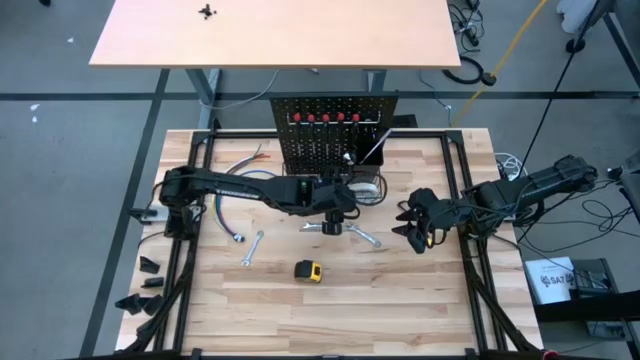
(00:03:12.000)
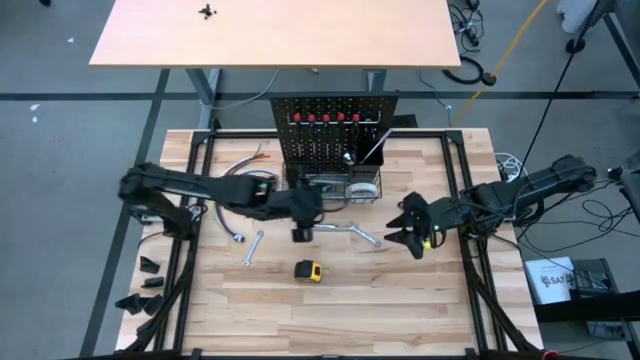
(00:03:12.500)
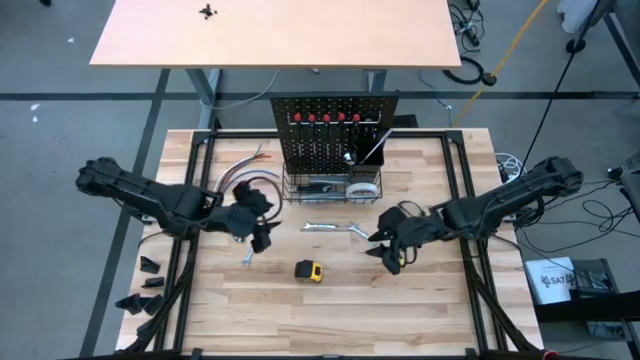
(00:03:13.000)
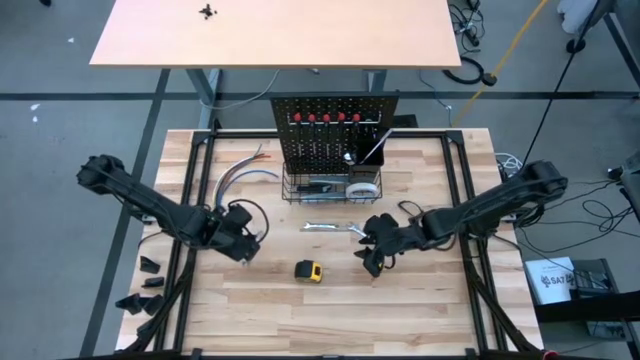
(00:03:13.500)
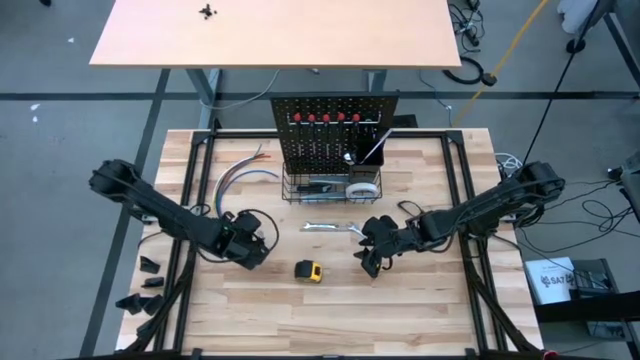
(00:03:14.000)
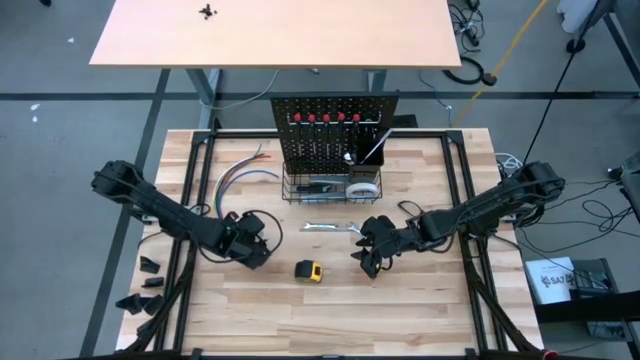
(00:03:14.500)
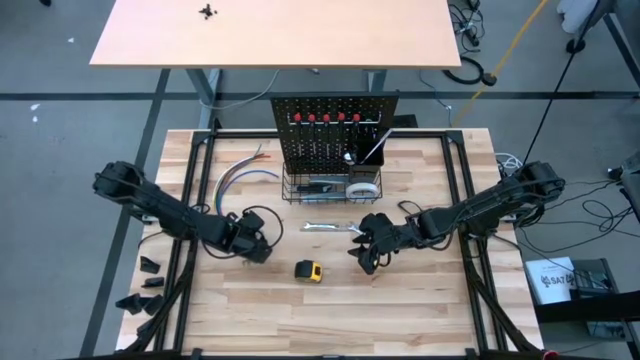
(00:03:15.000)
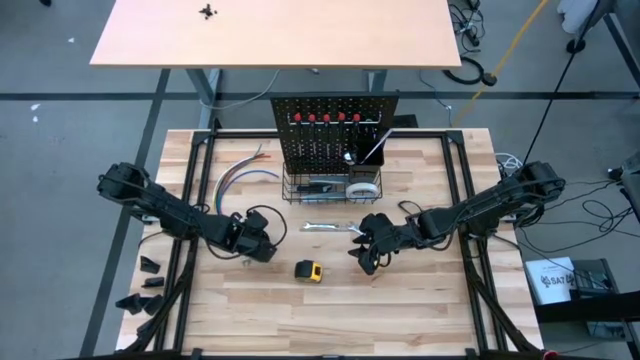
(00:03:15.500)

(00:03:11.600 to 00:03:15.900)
Task: Hang tools onto peg board
Put the wrench into the pegboard bin

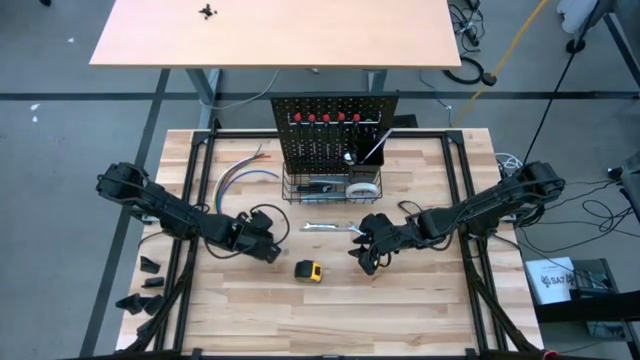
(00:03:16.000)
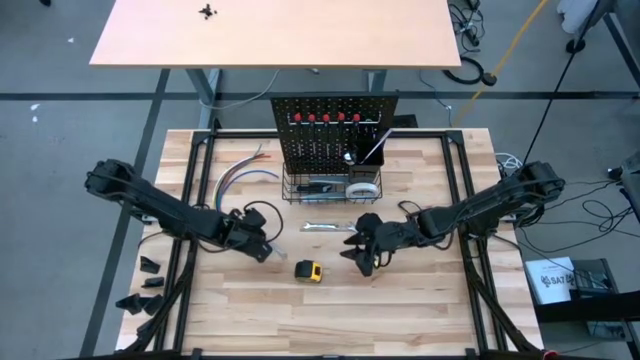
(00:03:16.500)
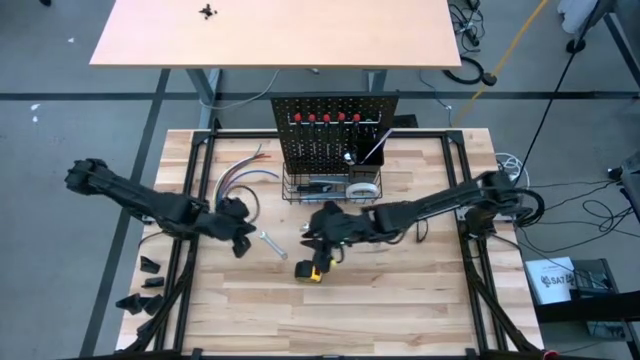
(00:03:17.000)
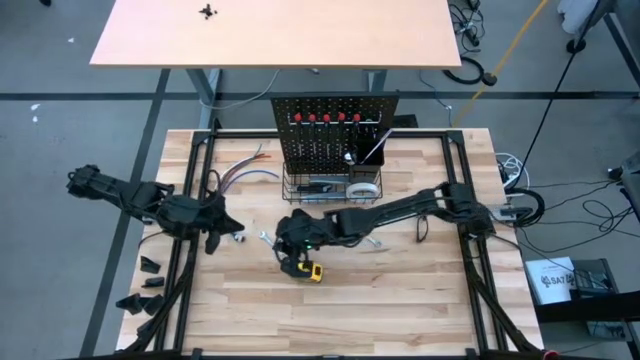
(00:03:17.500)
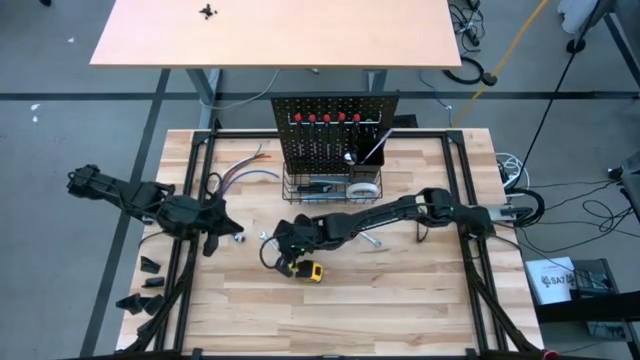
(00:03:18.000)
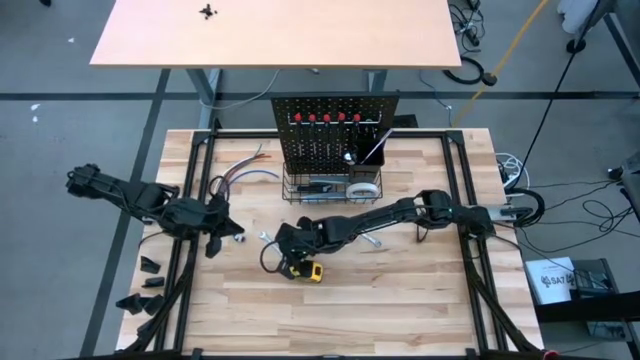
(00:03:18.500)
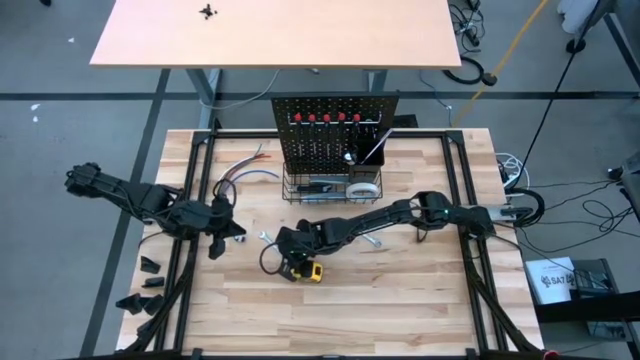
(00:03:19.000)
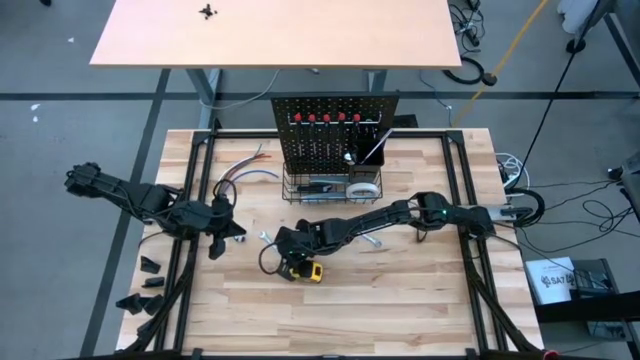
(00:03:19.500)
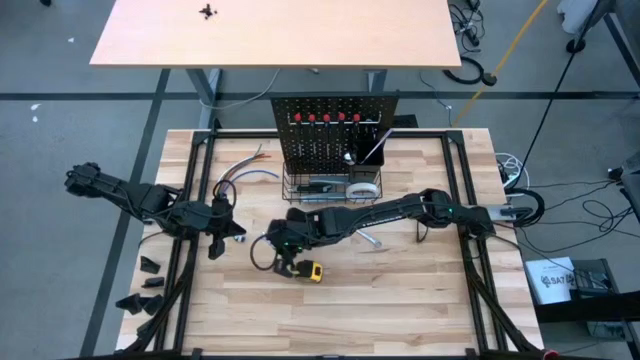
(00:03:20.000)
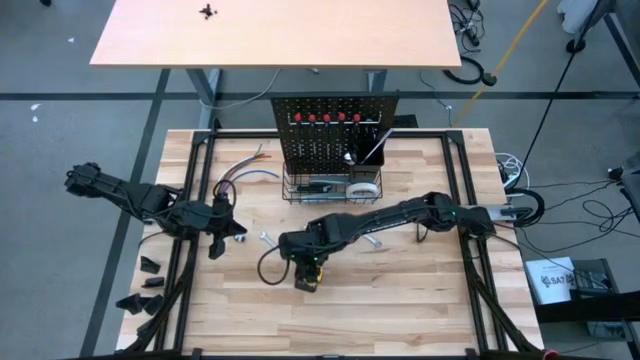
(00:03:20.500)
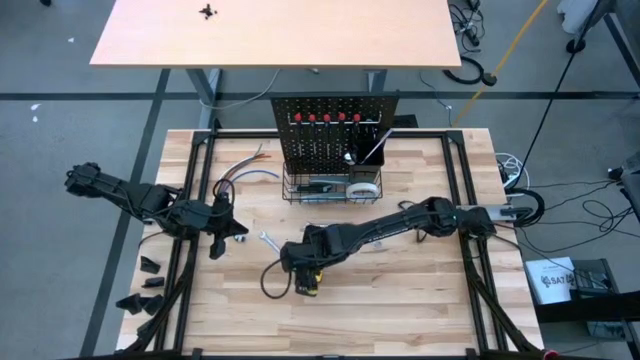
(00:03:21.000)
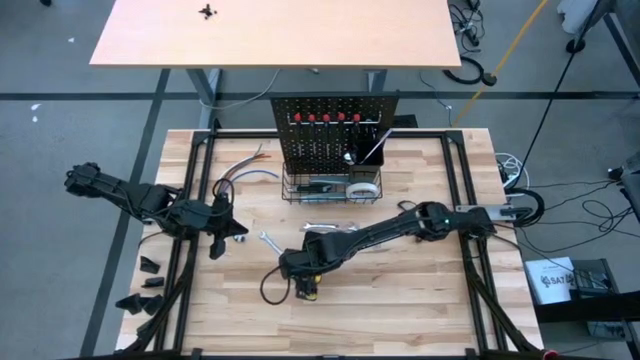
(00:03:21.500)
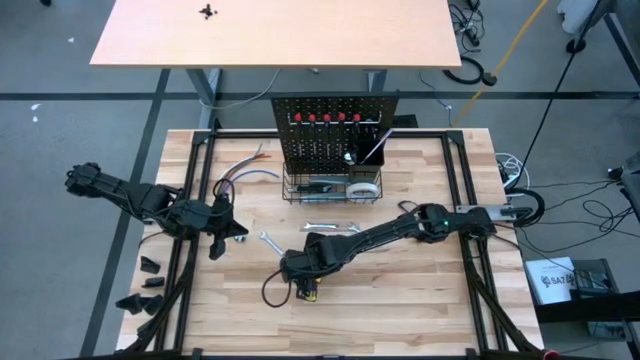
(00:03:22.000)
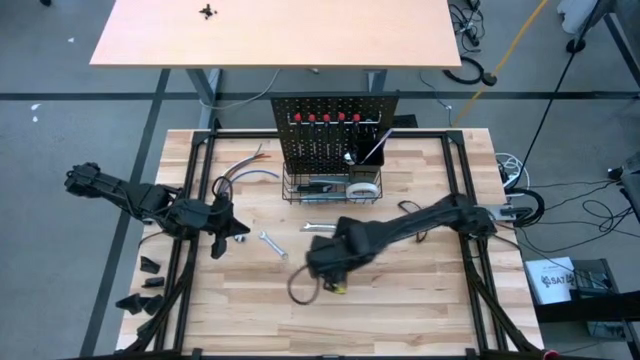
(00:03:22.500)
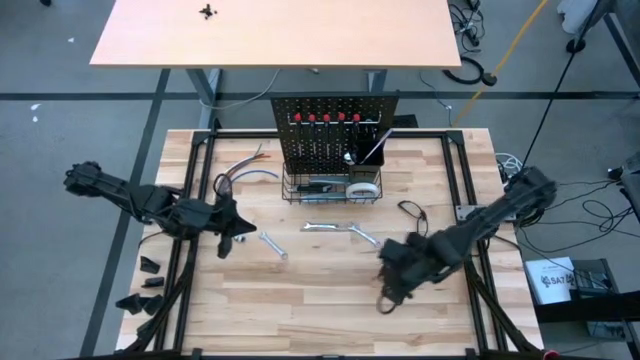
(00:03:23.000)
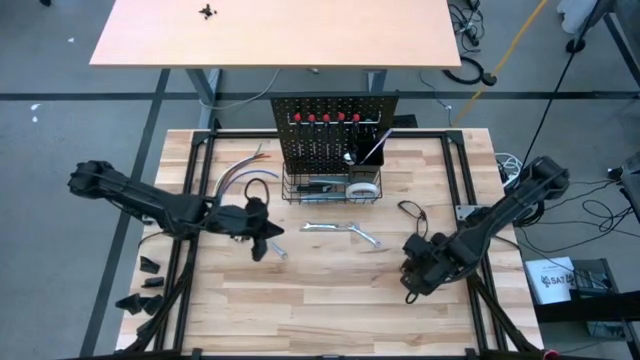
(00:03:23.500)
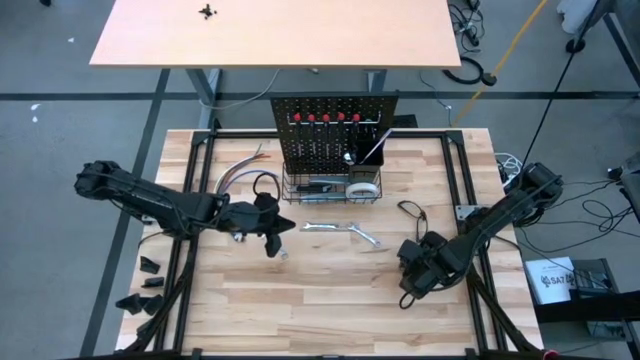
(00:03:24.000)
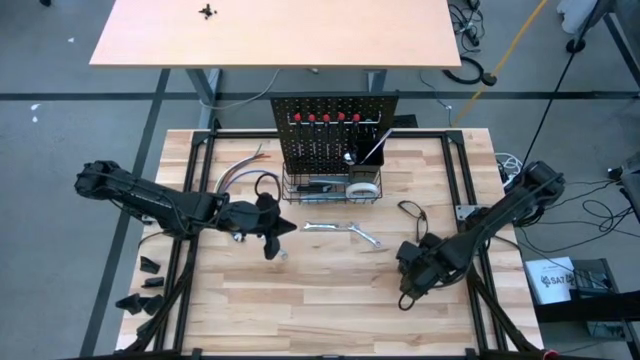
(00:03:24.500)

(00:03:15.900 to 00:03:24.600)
Move the measuring tape to the right side of the table

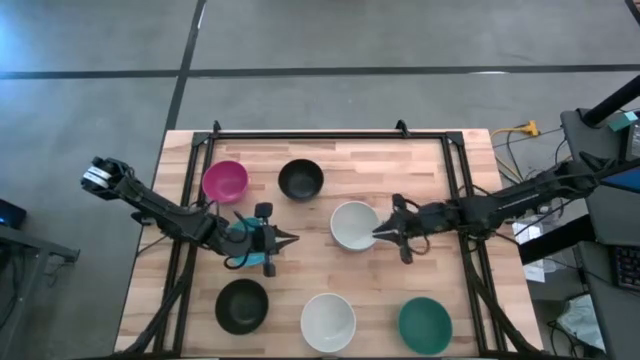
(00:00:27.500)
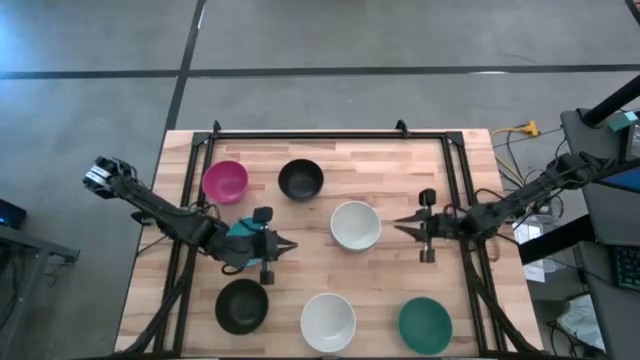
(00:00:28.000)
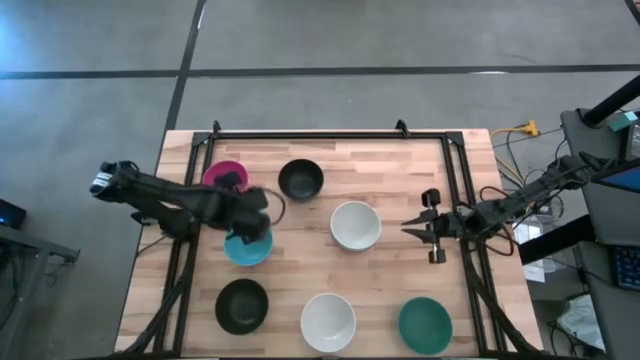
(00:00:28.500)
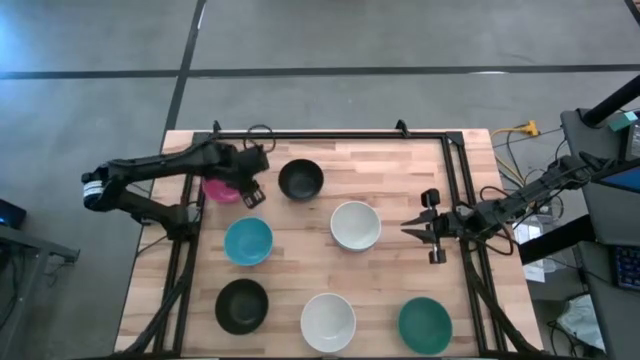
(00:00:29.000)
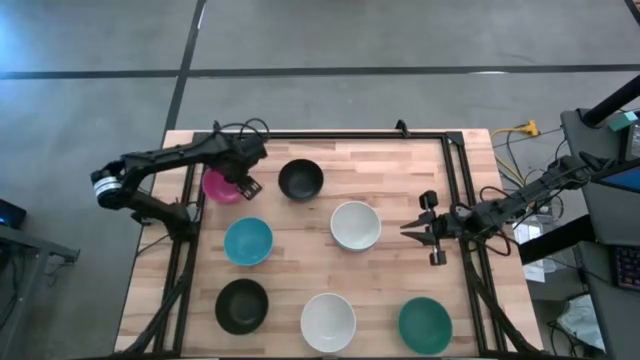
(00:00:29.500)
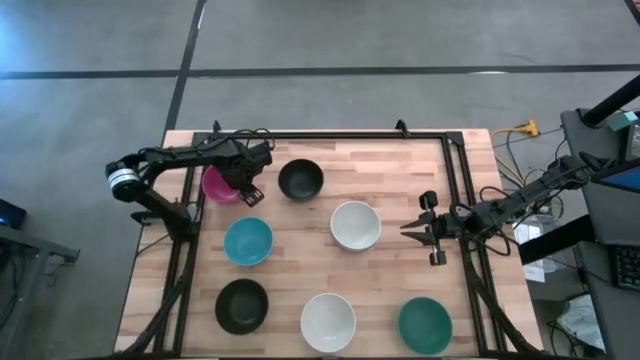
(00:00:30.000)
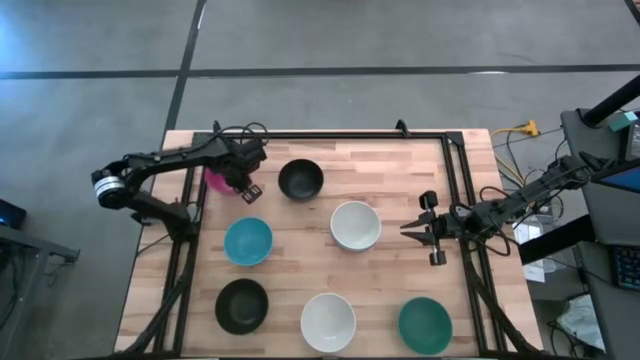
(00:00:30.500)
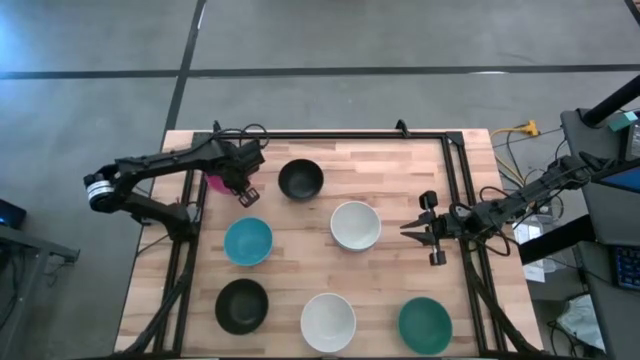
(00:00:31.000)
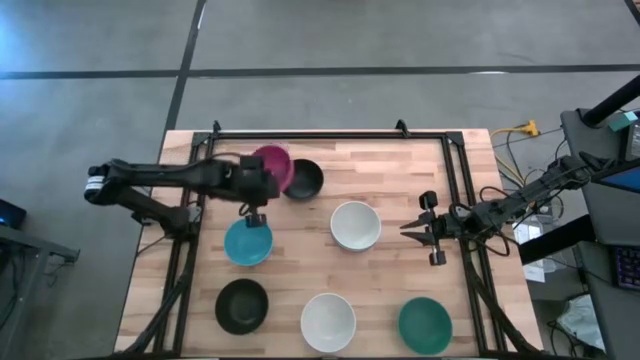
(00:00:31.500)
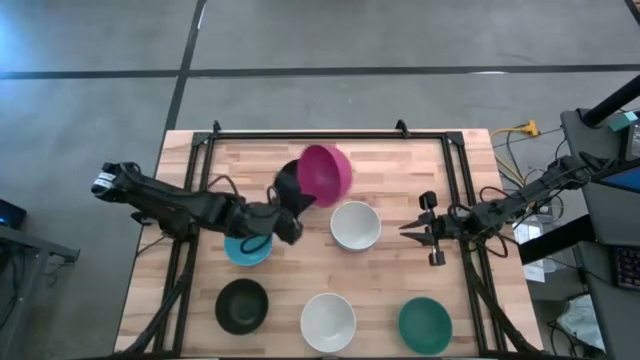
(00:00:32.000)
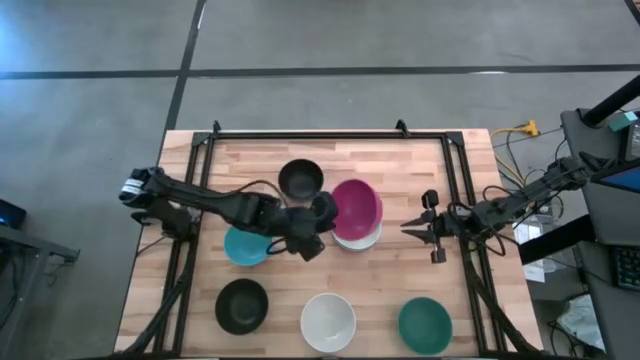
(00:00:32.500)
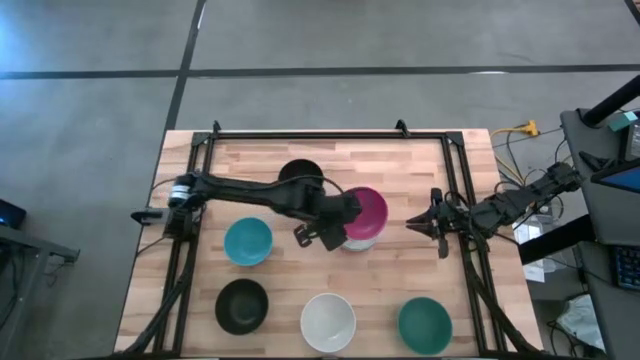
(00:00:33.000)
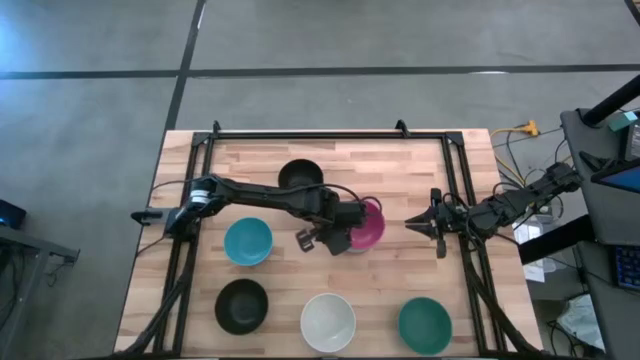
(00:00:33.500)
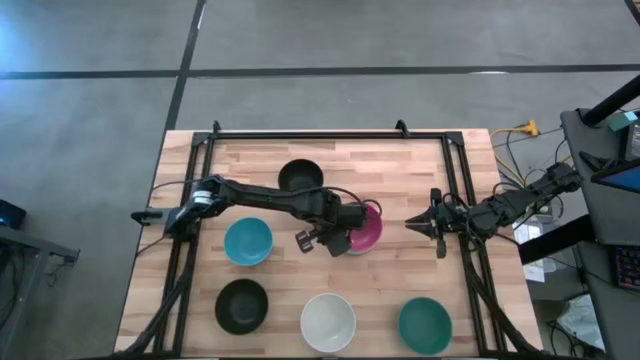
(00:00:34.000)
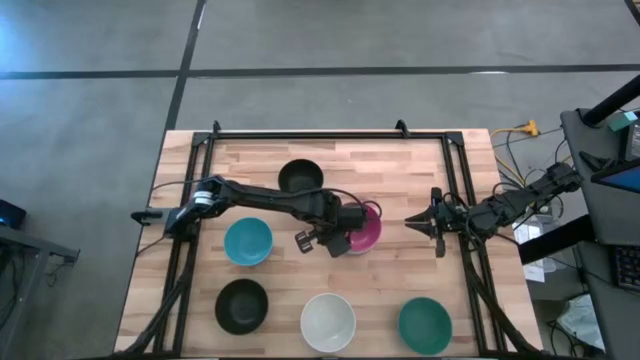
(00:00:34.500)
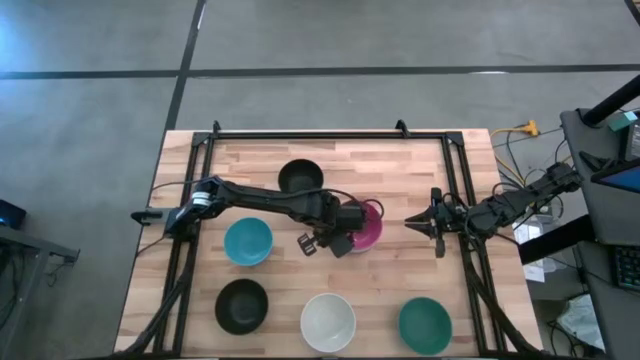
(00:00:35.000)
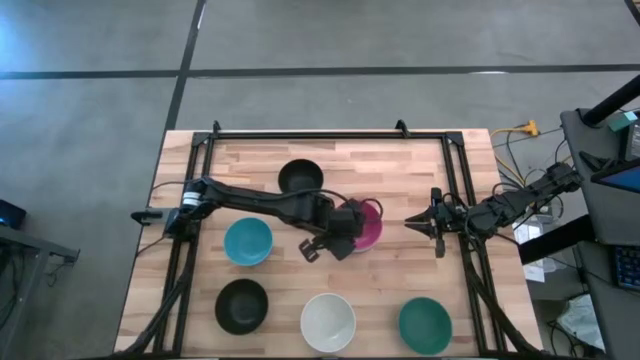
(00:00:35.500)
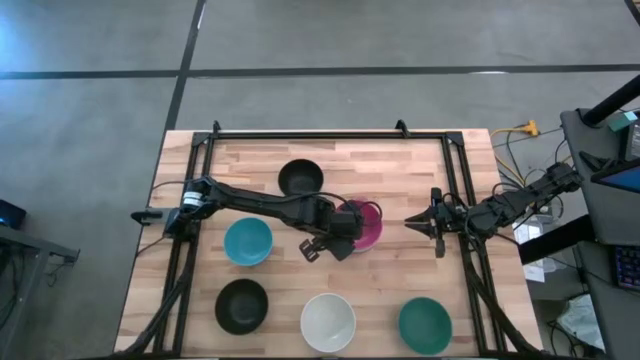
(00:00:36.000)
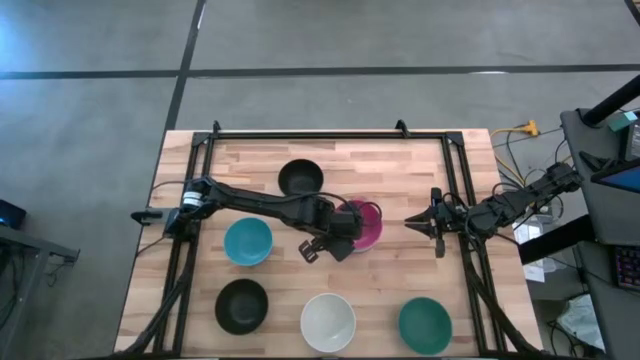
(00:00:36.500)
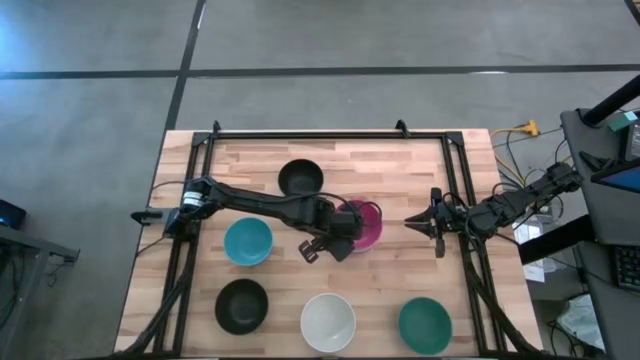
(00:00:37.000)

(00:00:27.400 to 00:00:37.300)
Task: Nest bowls inside each other
Stack the red bowl on the top white bowl
